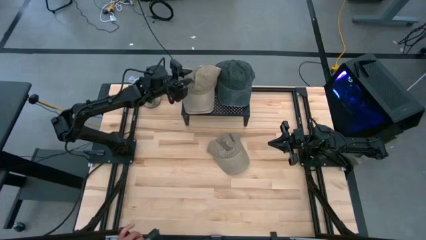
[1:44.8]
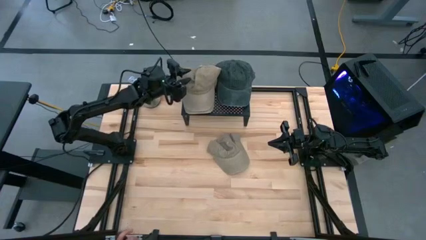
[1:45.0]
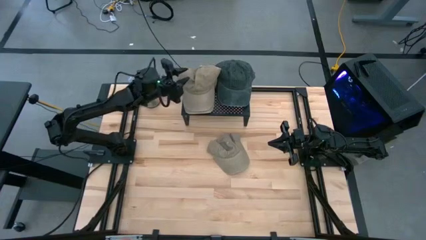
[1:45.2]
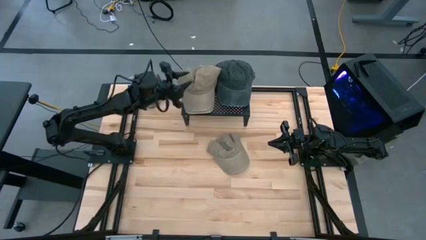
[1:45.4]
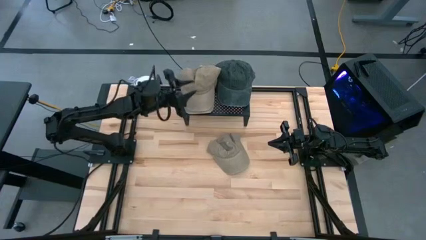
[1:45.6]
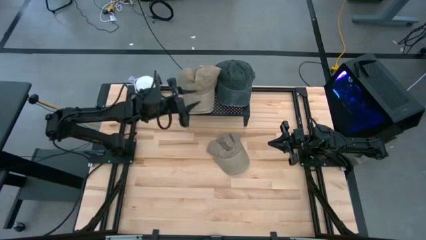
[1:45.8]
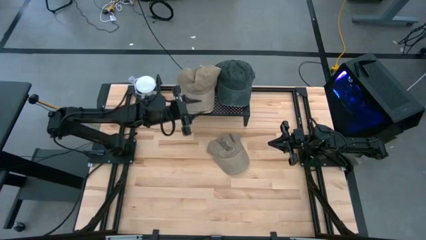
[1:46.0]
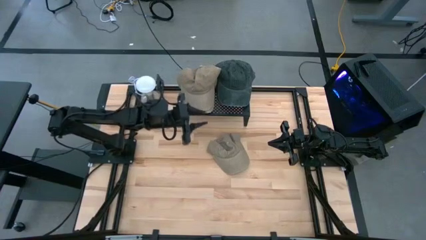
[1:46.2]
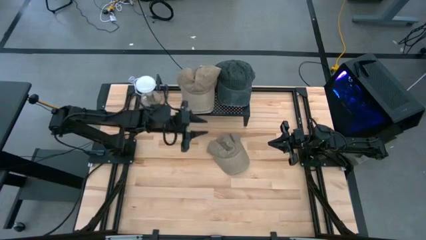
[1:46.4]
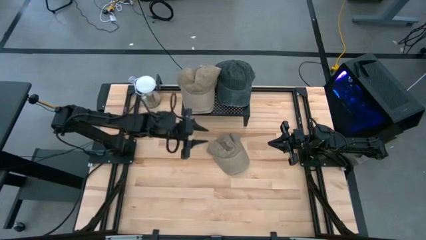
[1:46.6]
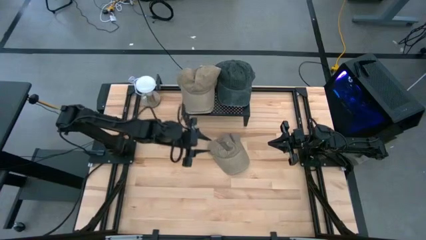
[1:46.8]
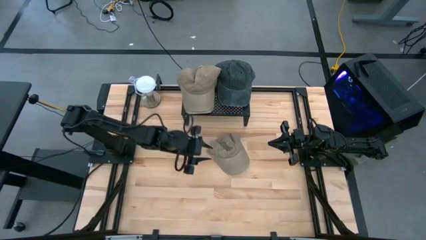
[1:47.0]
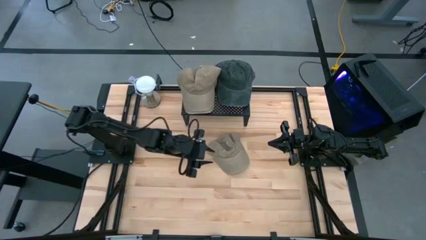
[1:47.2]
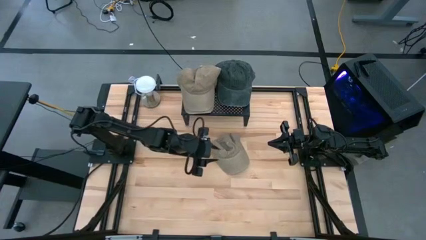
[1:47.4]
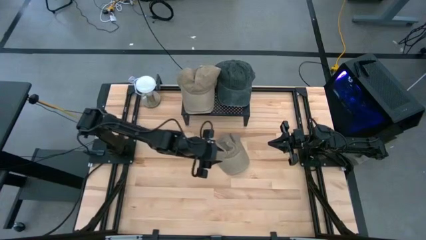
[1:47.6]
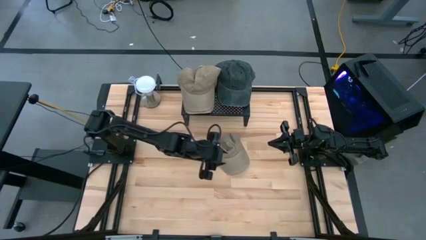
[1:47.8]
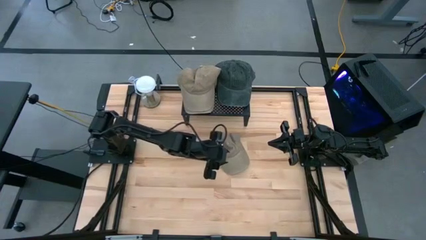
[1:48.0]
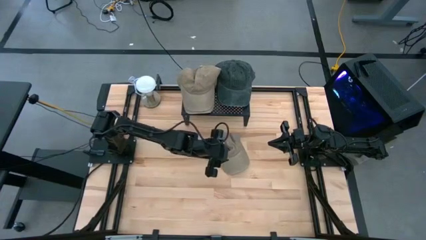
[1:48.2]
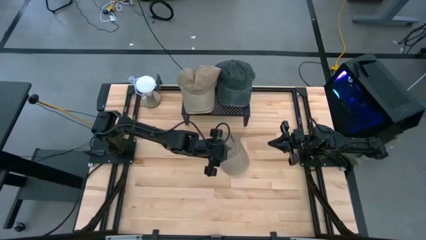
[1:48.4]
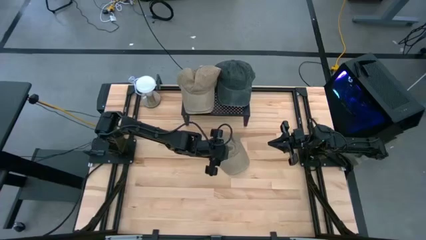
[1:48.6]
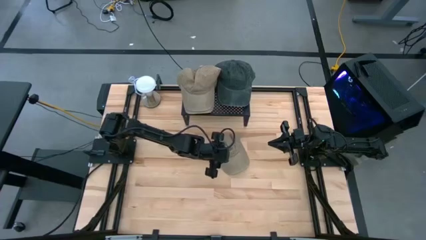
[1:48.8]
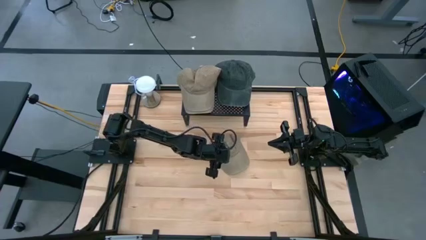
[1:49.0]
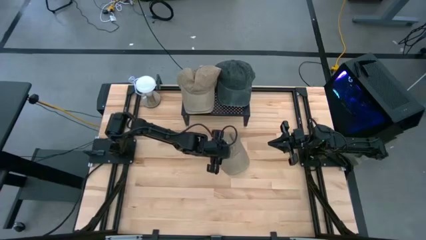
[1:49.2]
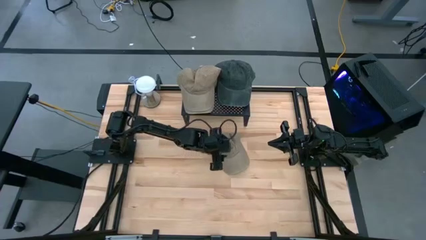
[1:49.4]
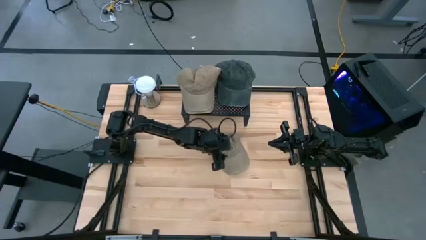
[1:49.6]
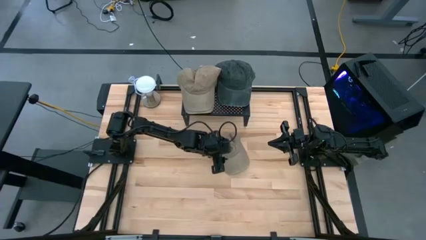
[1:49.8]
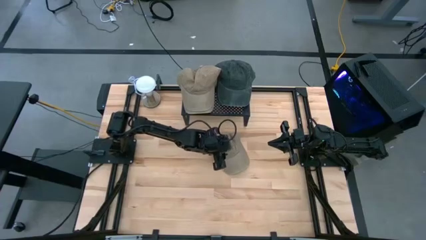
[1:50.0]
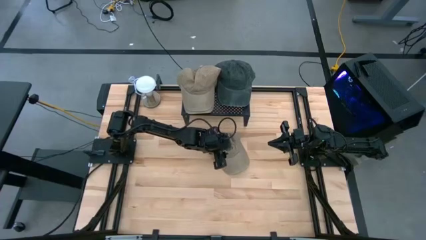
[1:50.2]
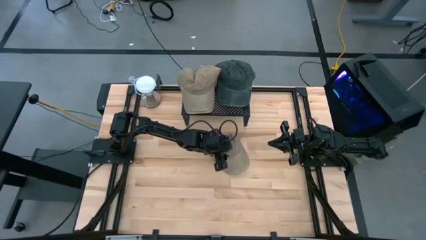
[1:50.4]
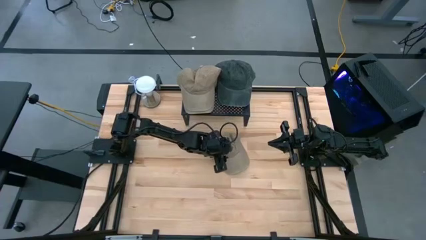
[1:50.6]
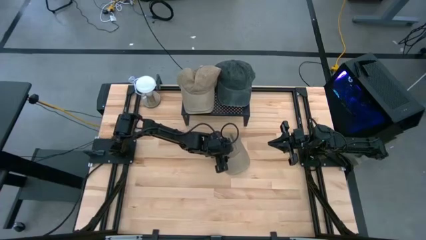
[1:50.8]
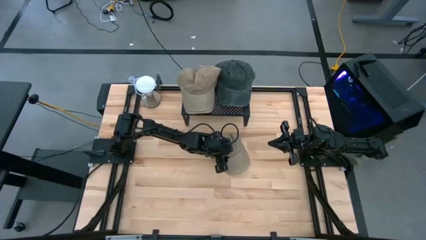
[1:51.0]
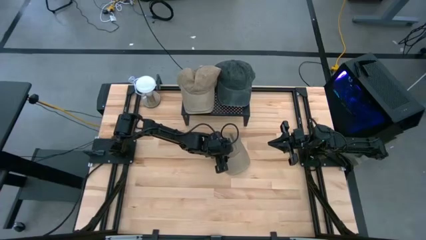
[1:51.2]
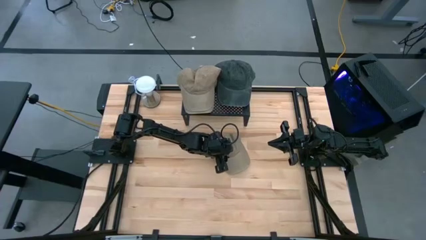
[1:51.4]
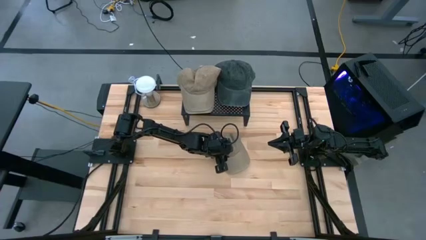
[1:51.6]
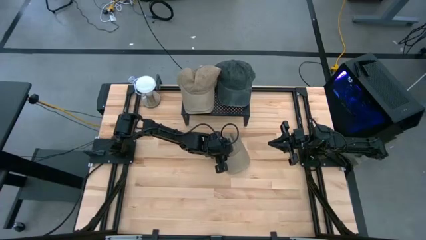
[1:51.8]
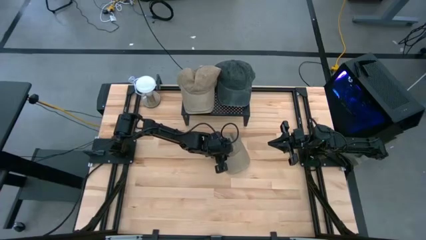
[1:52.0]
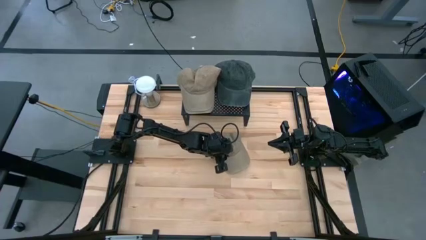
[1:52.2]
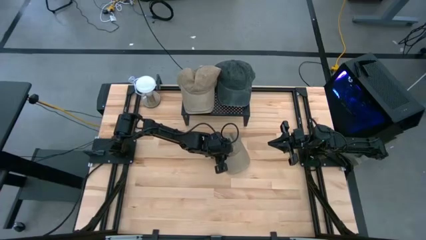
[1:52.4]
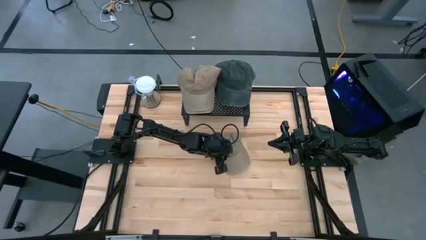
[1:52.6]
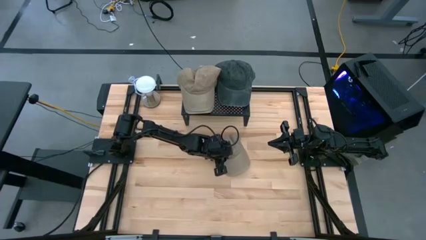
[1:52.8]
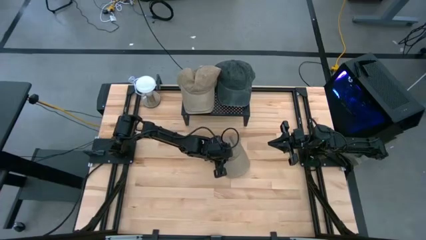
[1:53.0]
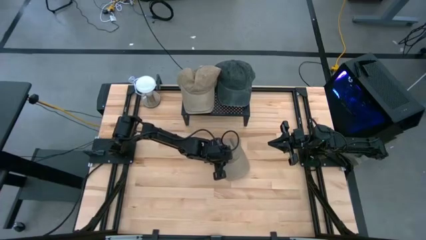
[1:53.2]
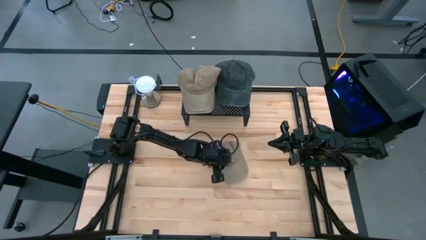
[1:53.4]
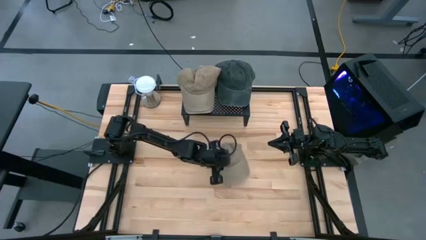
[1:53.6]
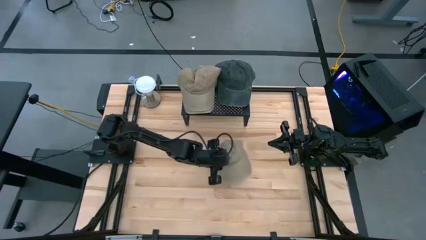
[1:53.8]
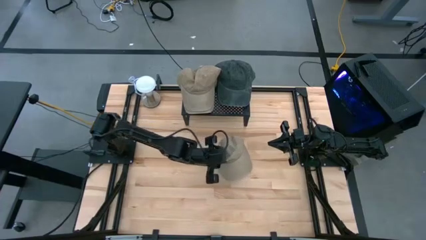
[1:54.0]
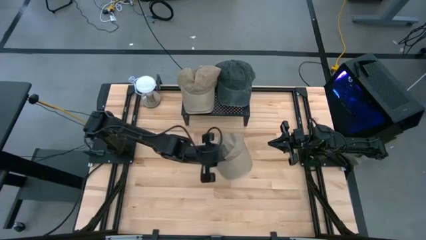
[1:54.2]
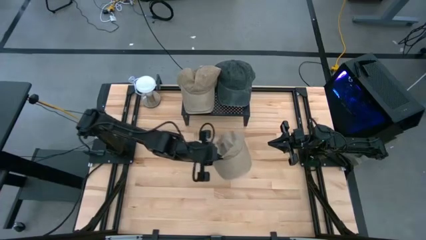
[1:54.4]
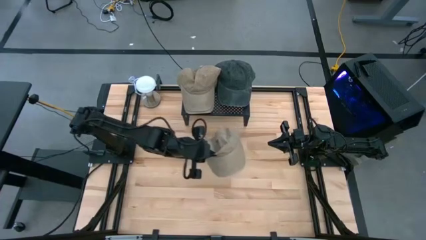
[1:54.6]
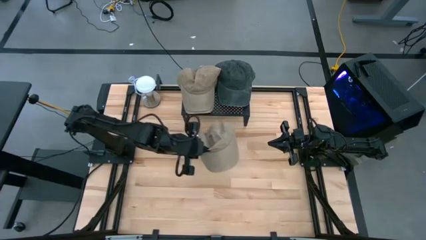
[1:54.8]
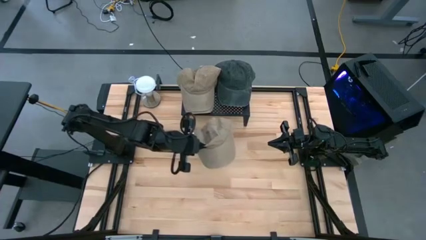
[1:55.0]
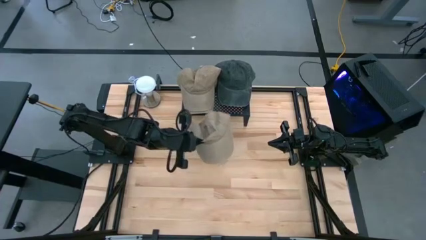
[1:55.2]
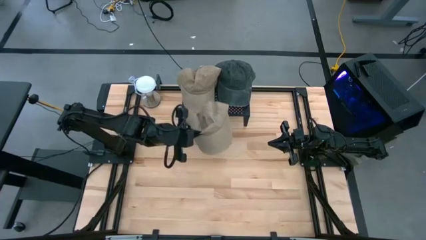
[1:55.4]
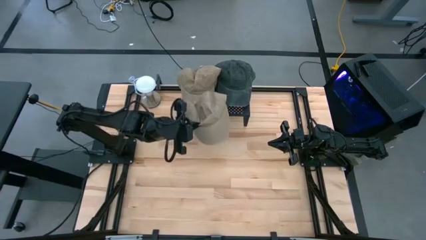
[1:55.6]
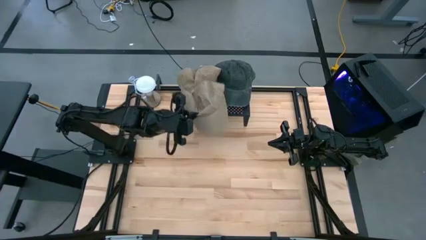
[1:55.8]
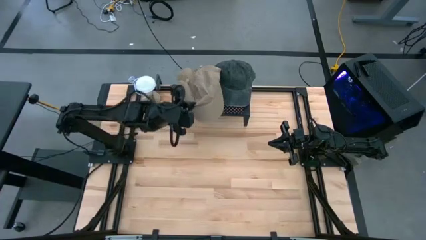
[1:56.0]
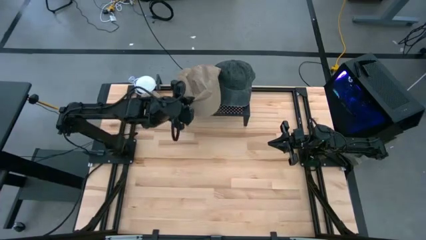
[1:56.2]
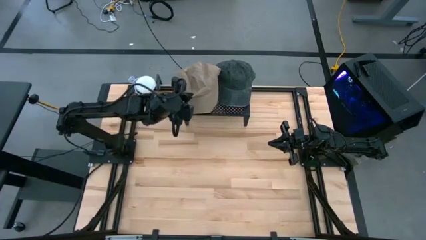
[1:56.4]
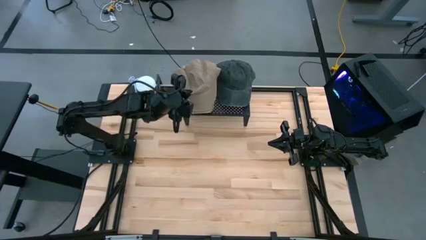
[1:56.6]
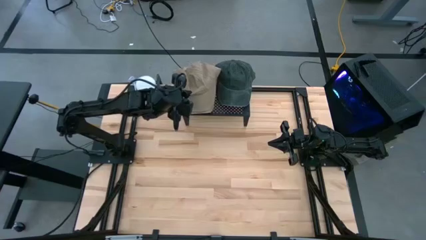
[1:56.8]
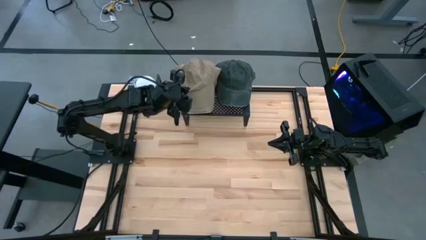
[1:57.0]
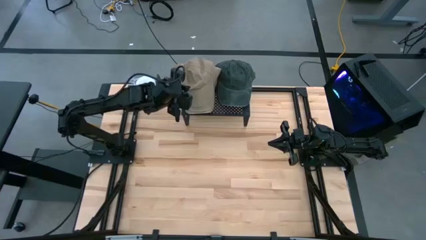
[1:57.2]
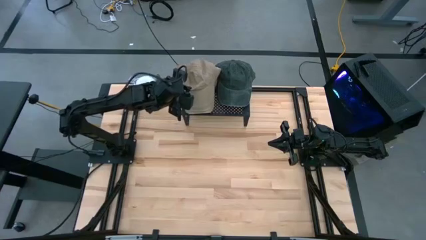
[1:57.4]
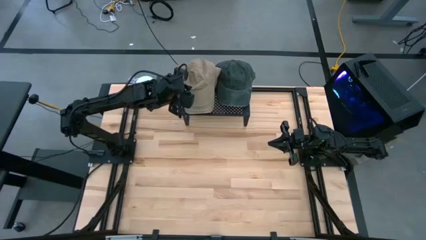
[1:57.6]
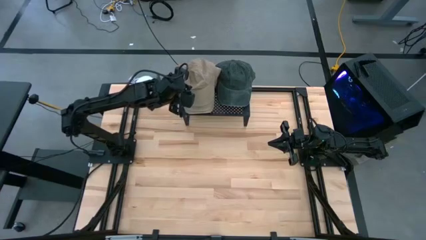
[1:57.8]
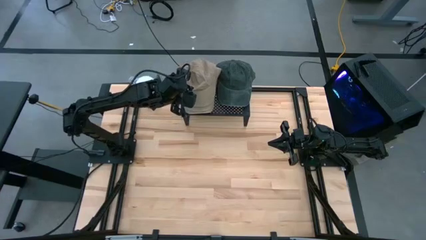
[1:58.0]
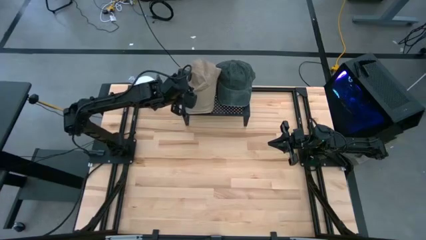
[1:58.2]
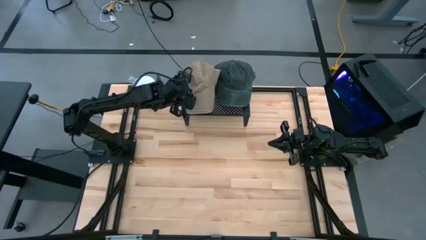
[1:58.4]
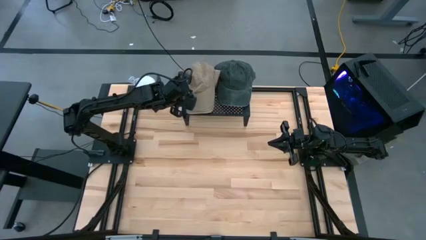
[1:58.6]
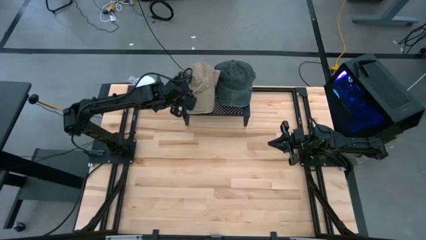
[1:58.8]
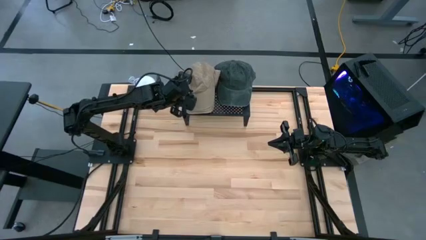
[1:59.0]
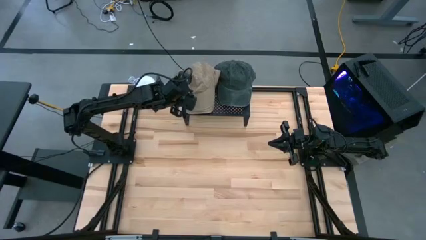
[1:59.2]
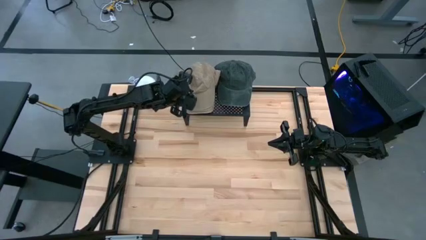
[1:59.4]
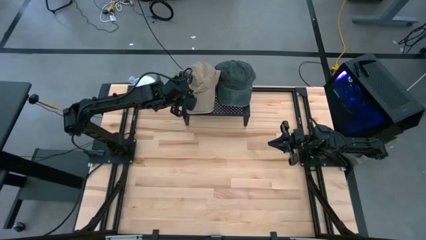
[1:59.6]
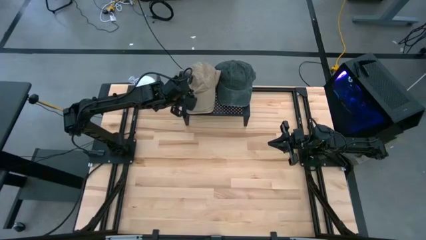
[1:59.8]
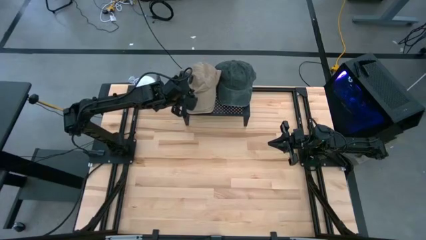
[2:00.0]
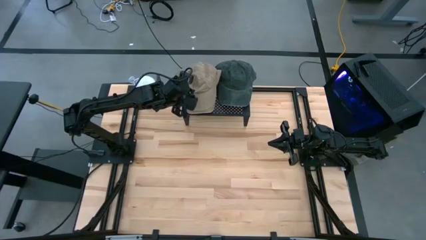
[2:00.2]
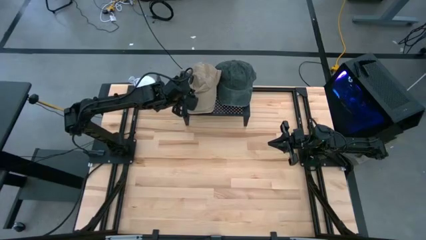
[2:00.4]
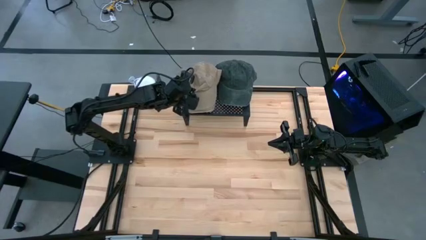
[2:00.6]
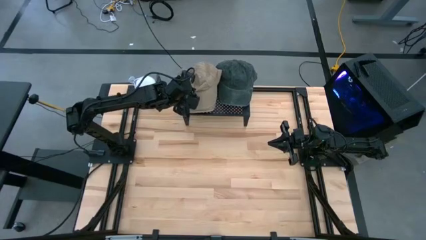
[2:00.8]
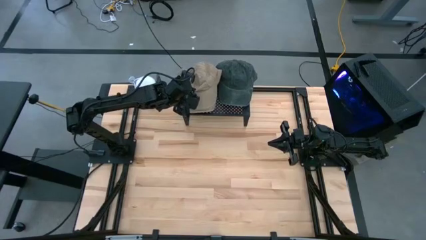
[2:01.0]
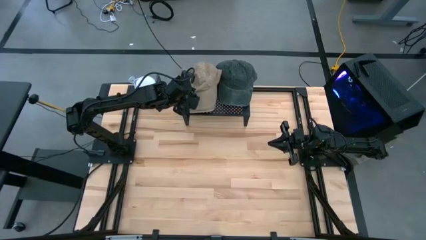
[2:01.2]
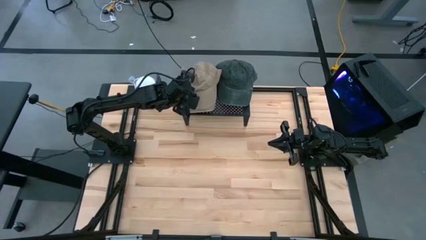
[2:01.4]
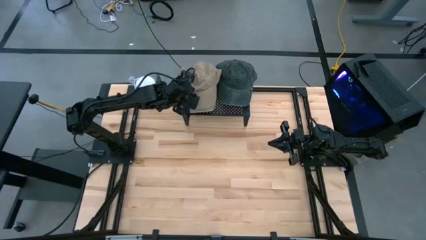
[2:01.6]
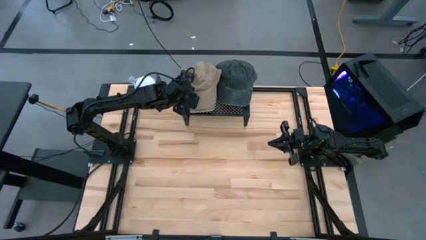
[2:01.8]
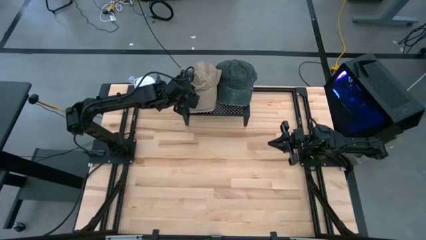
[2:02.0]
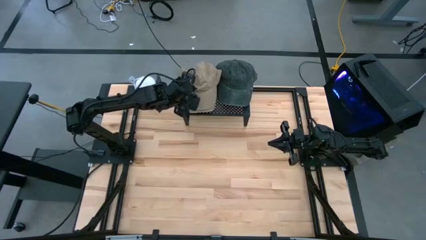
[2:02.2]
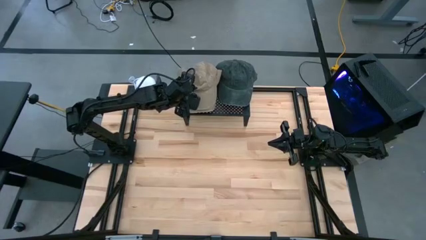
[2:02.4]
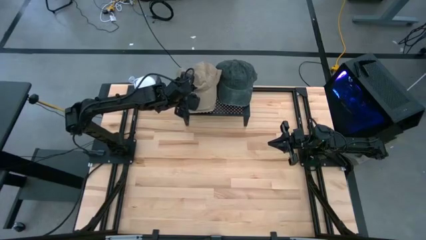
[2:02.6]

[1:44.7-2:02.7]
Task: Pick & Place hat
Stack the brown cap on the other brown cap on the shelf
